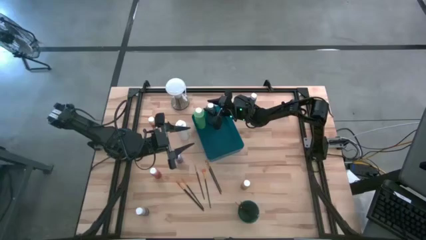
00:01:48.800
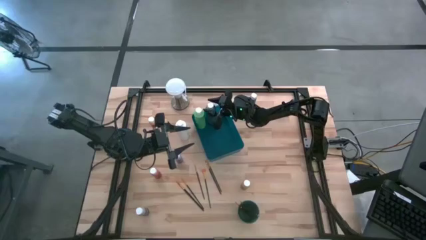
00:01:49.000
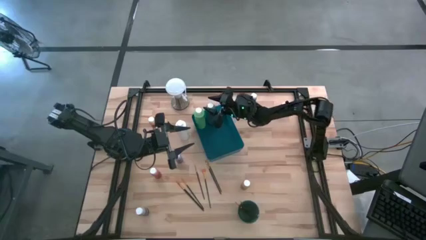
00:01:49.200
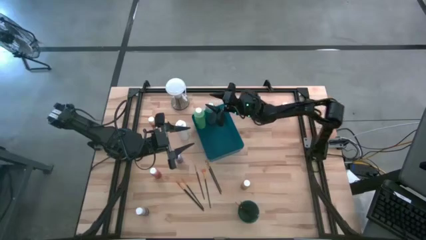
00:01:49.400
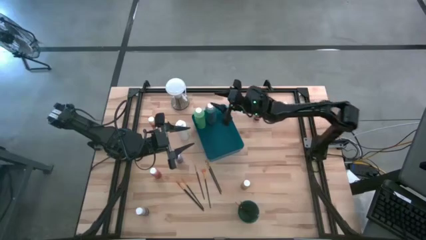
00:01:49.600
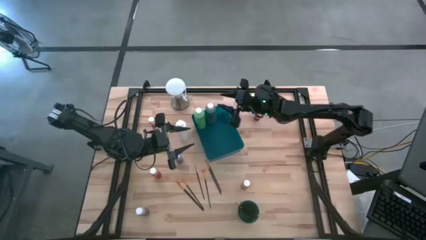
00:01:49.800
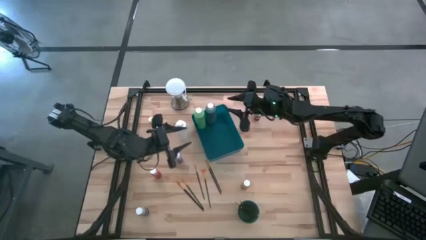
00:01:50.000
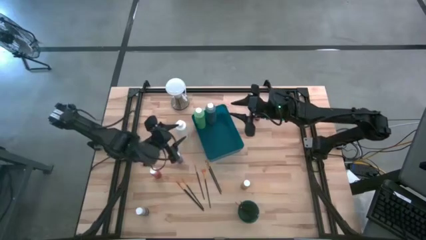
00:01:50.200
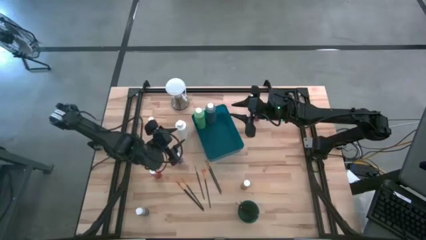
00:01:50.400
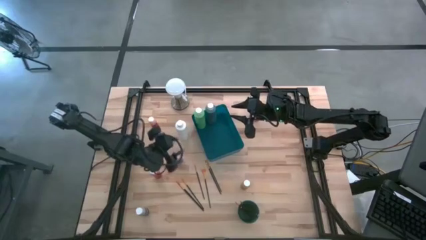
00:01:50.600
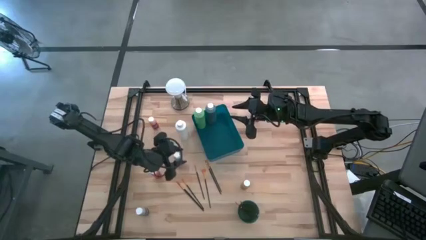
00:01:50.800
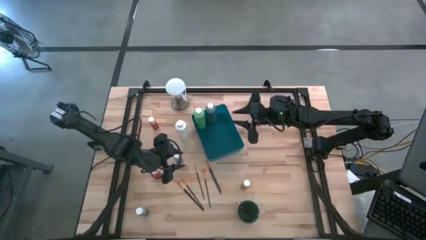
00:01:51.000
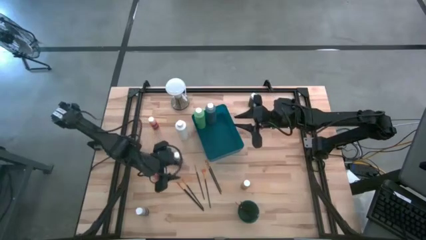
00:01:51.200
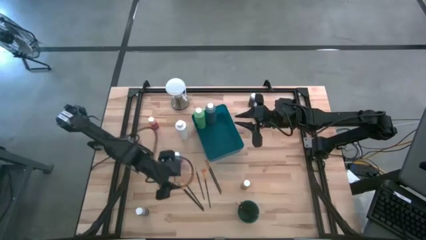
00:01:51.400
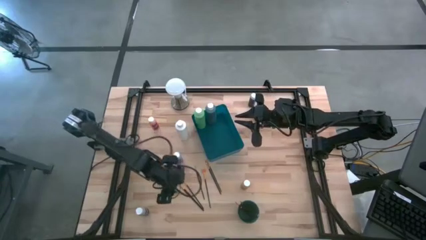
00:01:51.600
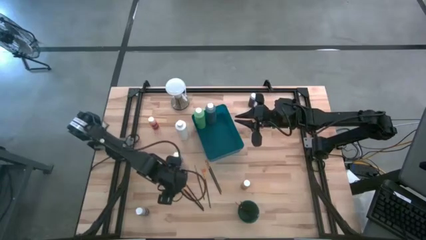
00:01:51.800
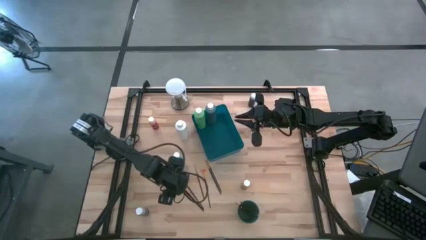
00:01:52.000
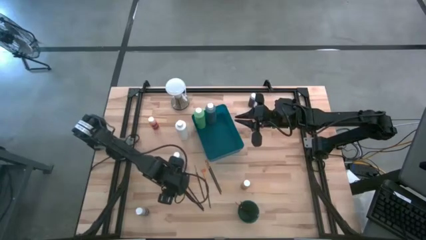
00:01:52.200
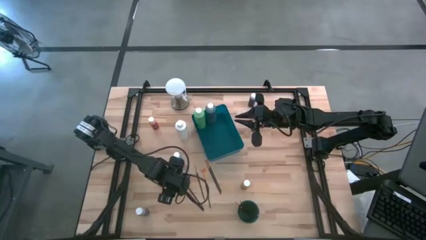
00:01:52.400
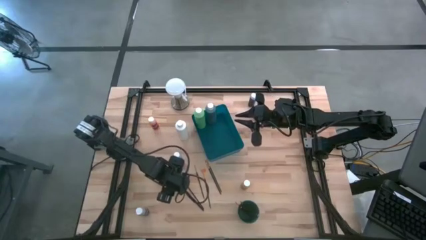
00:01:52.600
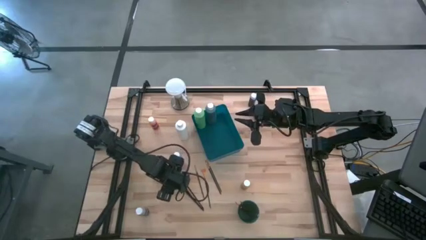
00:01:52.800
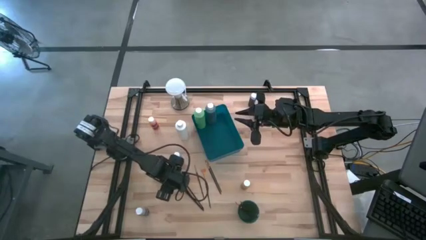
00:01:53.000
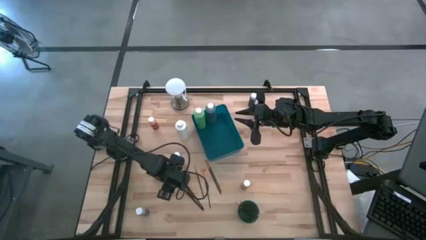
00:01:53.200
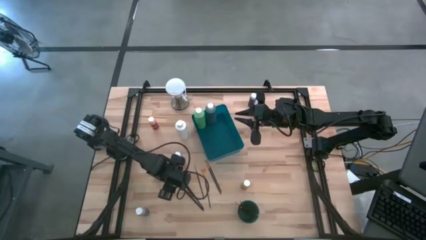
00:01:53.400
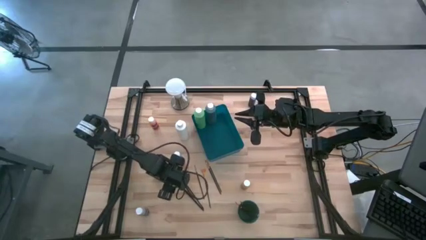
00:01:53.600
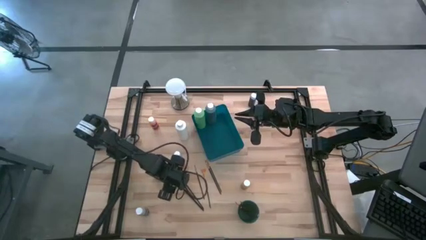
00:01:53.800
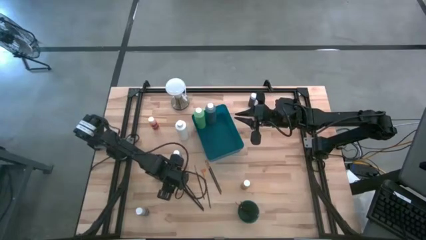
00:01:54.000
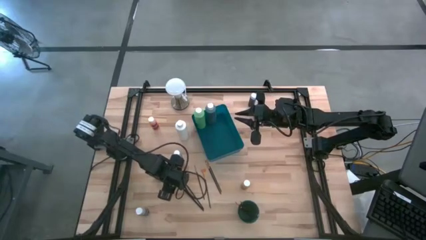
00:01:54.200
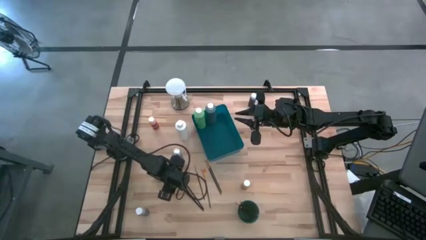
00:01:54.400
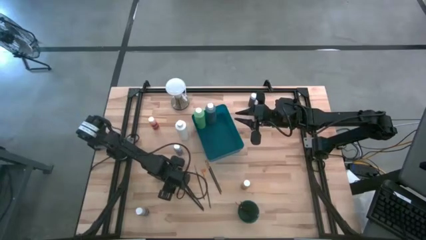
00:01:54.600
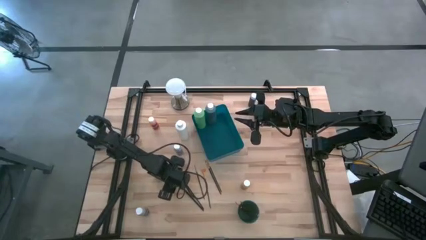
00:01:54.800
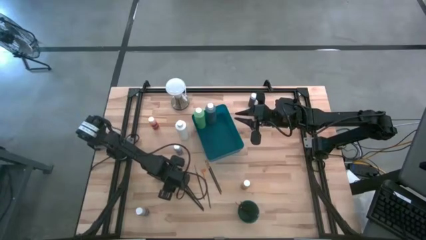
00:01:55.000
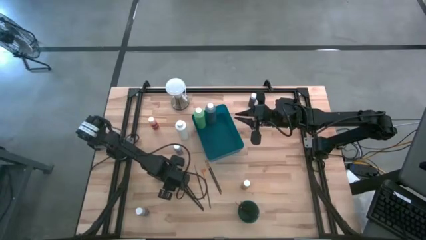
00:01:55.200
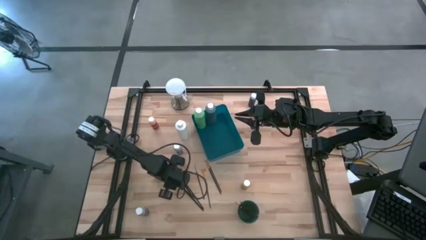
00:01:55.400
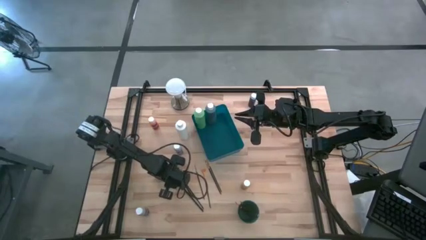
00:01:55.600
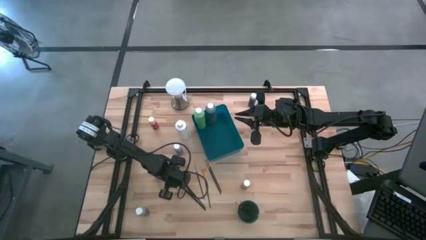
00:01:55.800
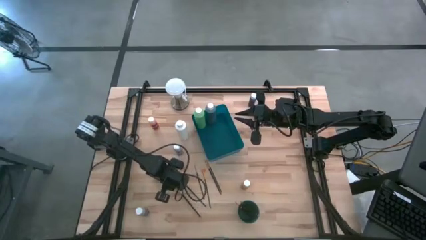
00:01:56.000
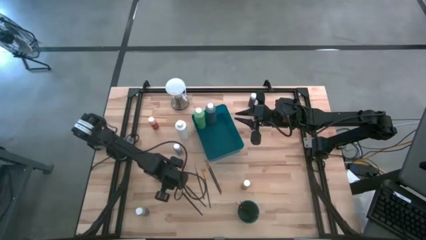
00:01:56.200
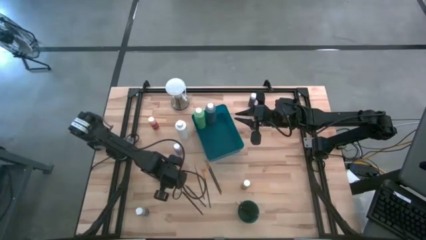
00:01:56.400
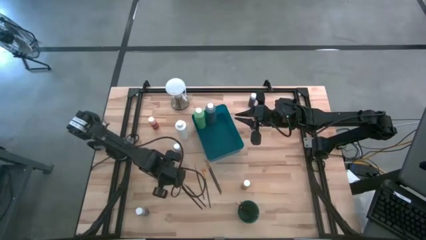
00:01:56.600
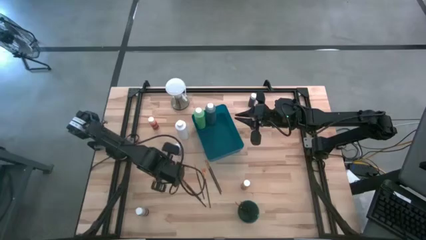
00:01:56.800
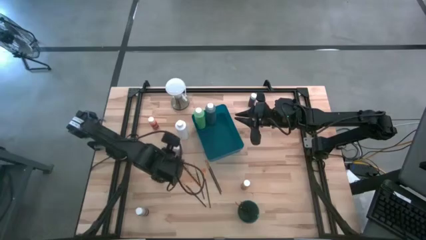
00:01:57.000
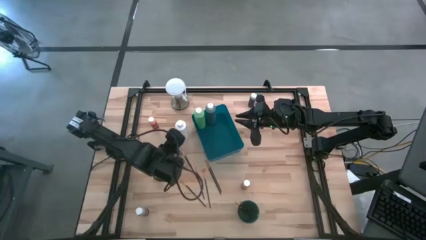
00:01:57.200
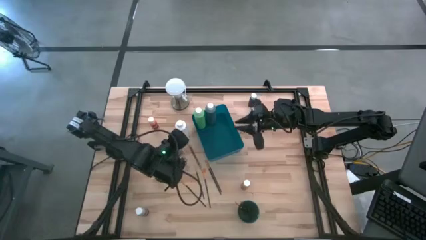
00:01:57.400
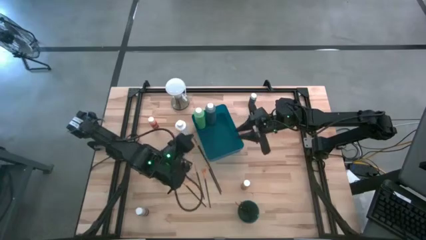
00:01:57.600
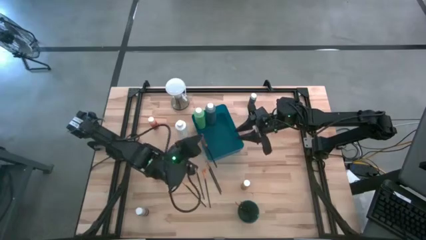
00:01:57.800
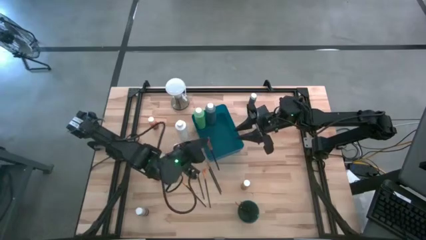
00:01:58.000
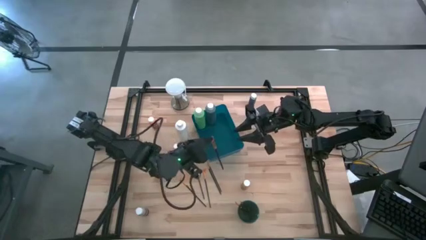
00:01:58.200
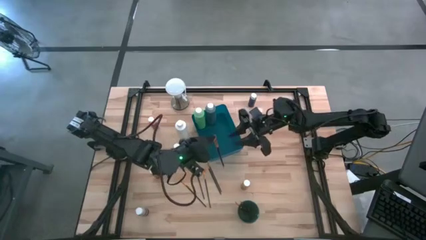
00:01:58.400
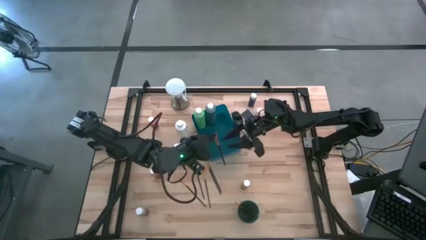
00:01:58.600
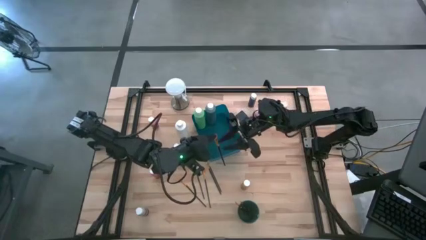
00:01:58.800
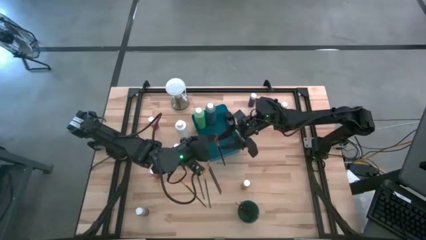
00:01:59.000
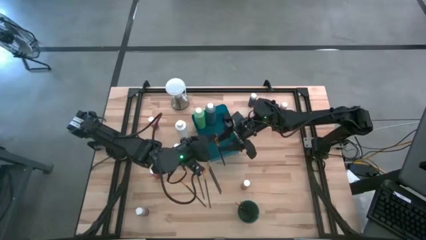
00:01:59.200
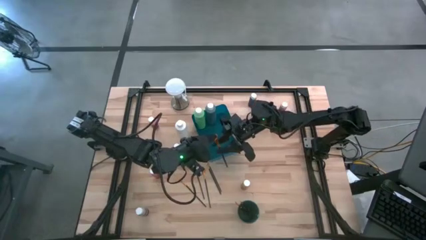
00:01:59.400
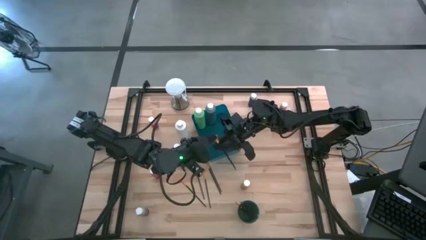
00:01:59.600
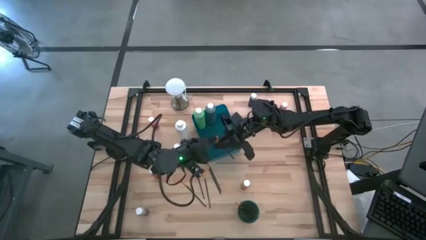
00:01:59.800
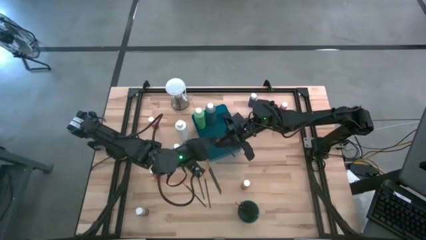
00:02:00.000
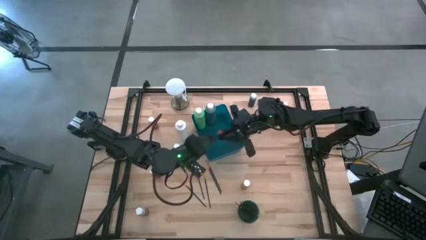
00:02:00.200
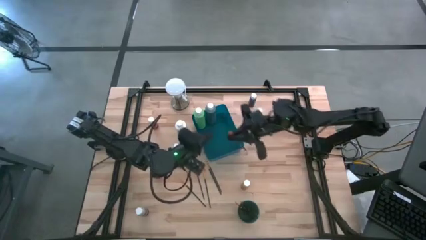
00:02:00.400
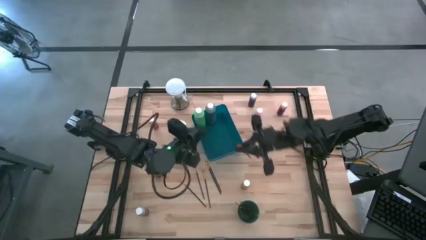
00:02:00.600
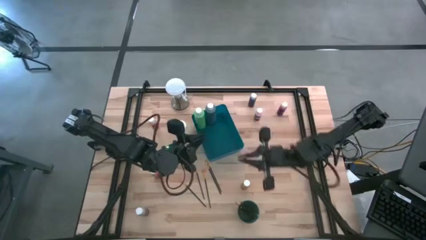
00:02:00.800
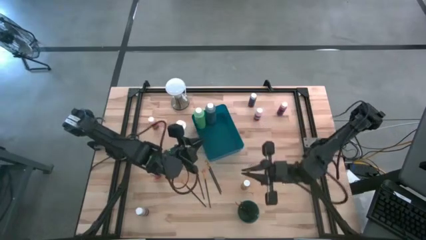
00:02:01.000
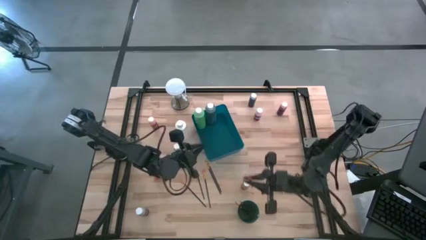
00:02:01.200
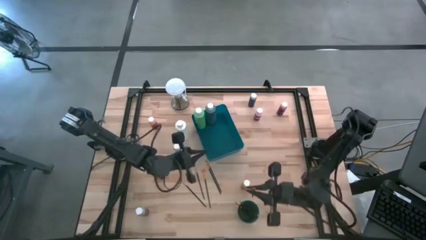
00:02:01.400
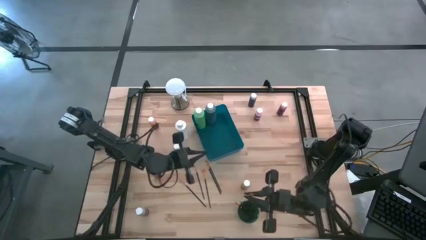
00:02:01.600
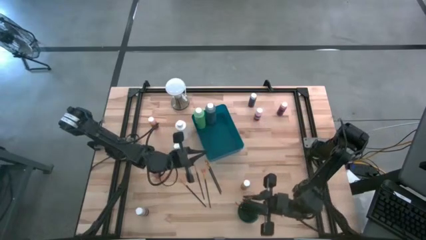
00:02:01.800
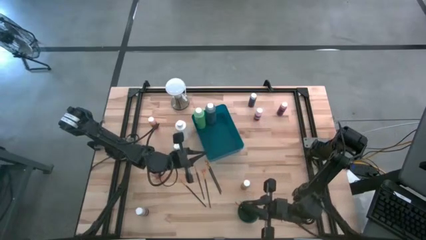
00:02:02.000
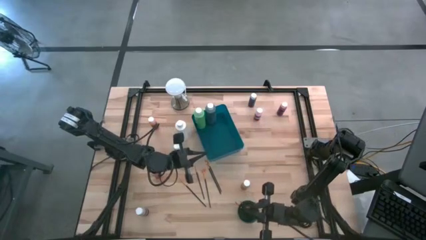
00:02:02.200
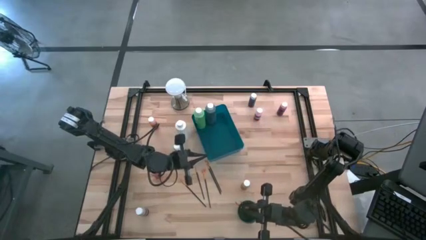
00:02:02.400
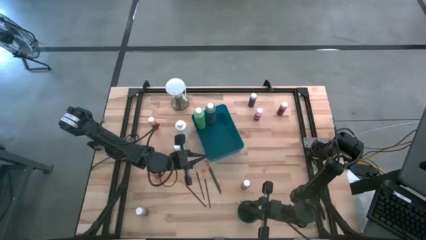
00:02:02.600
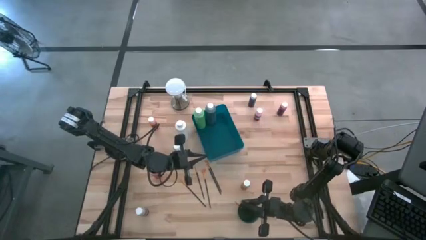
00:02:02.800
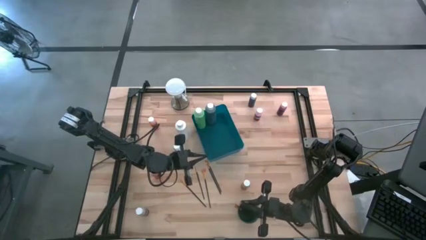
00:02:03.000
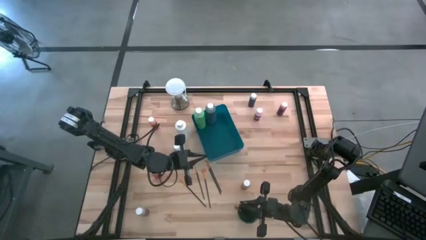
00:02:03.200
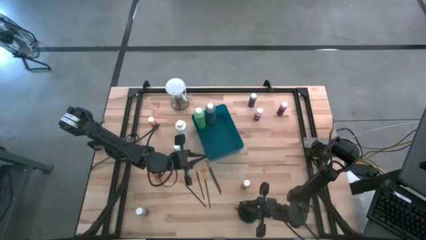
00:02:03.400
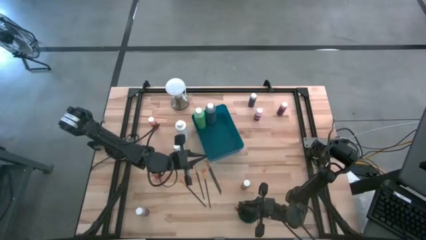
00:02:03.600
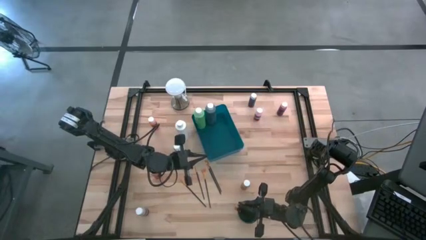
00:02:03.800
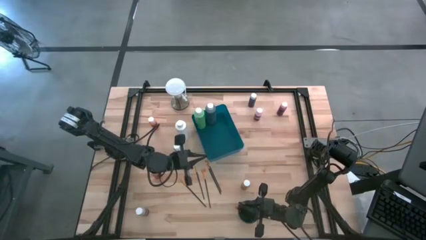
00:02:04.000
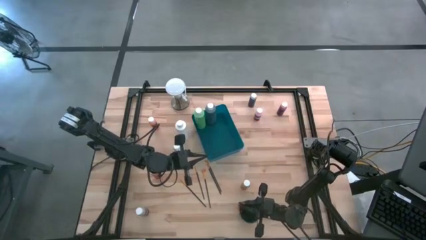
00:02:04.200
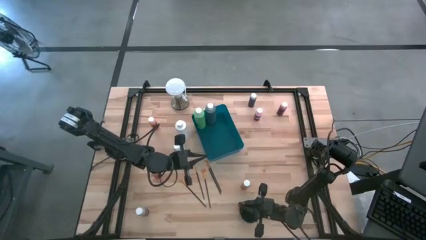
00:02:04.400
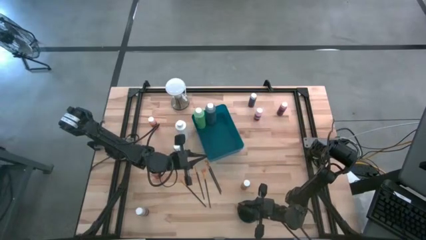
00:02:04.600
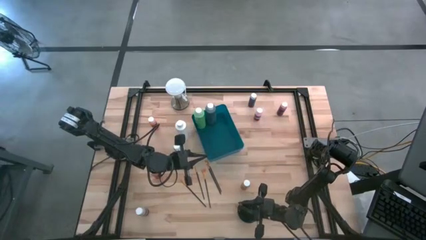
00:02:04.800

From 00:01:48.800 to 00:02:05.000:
Task: Pick & Place Paint Supplies
Put the gold paint brush into the green cup
